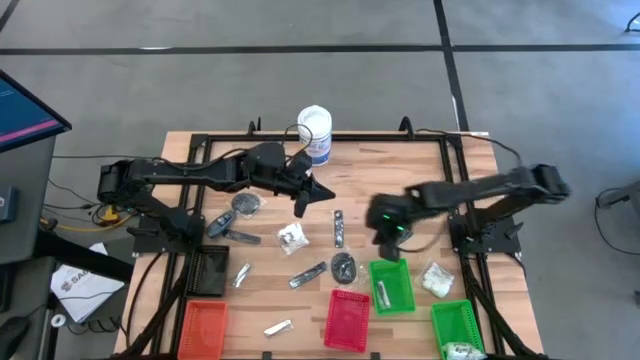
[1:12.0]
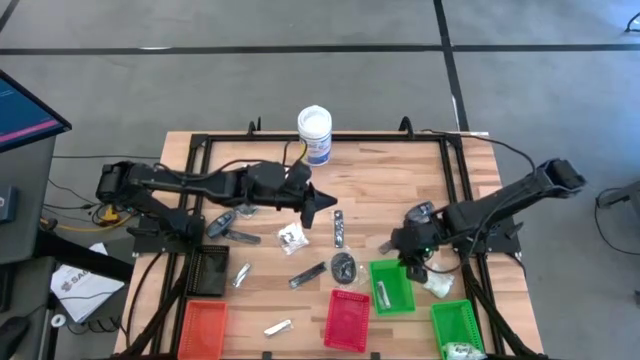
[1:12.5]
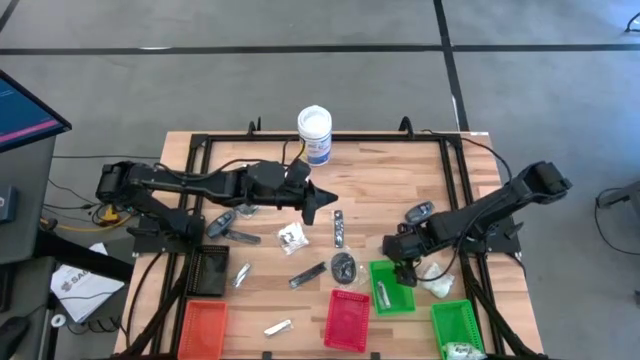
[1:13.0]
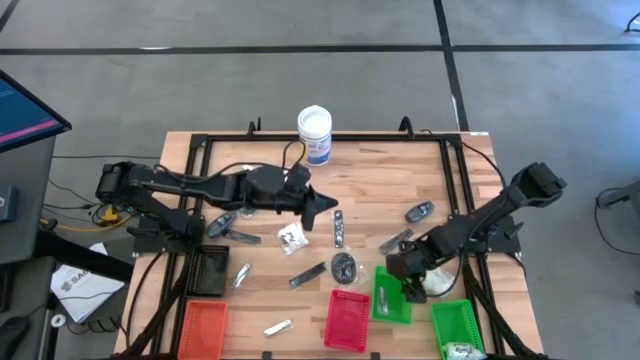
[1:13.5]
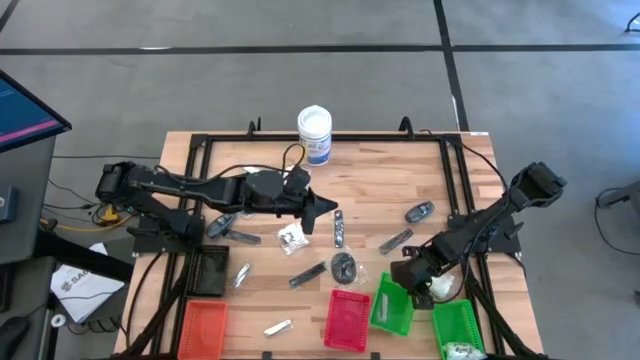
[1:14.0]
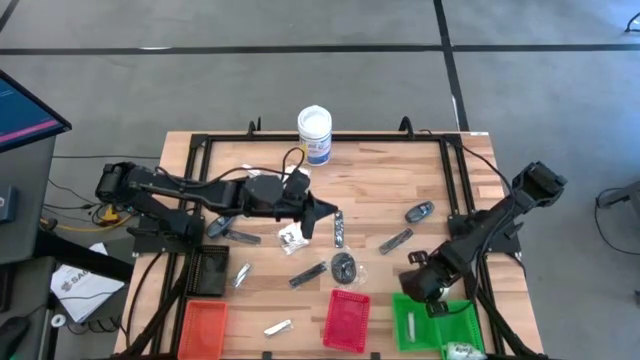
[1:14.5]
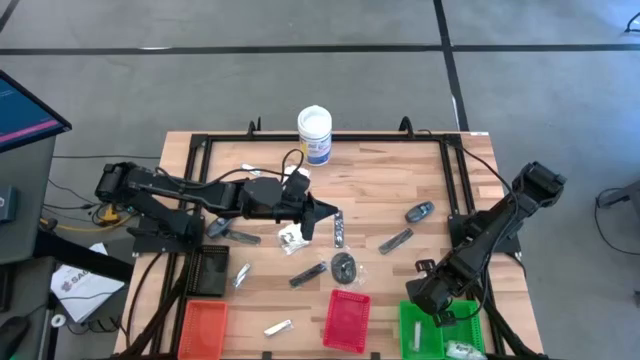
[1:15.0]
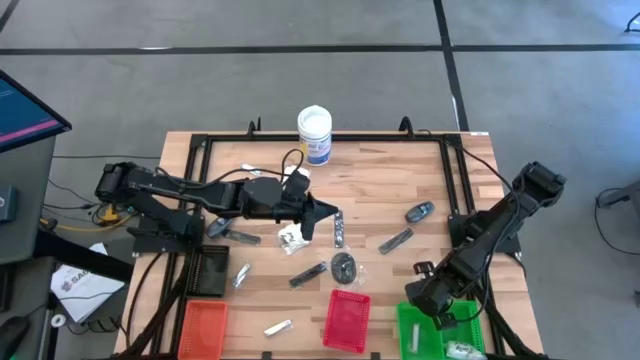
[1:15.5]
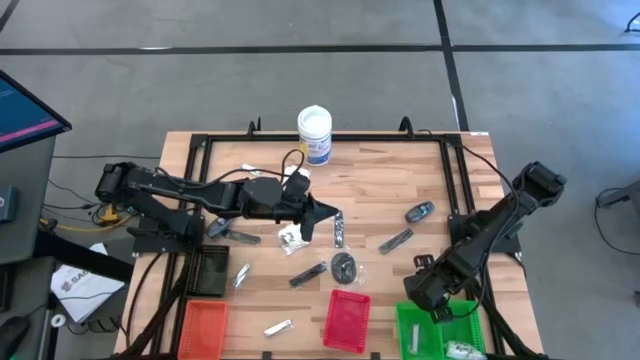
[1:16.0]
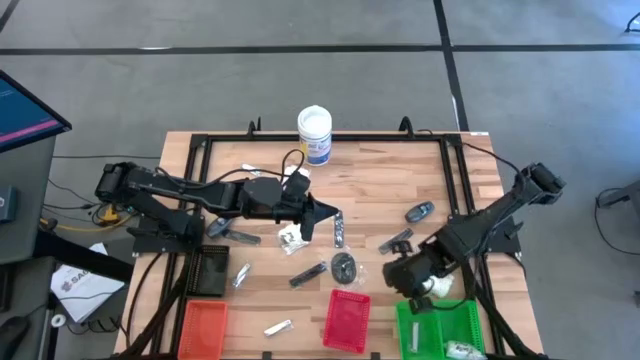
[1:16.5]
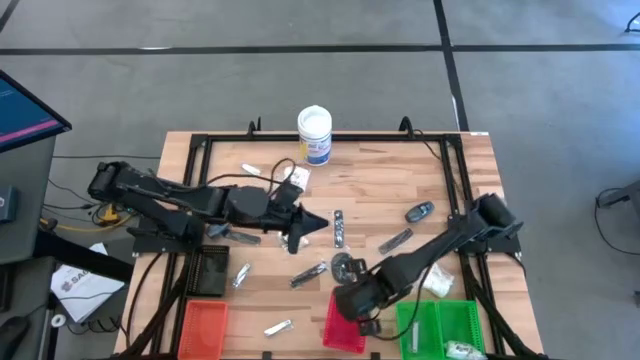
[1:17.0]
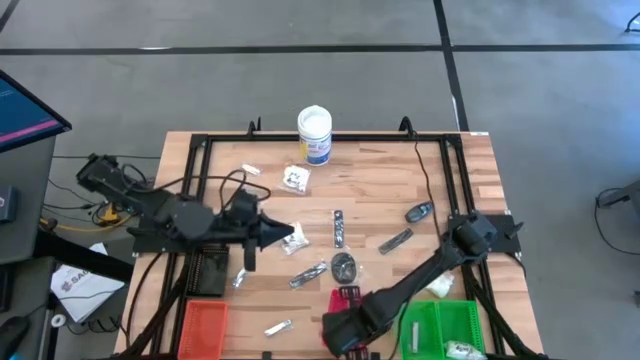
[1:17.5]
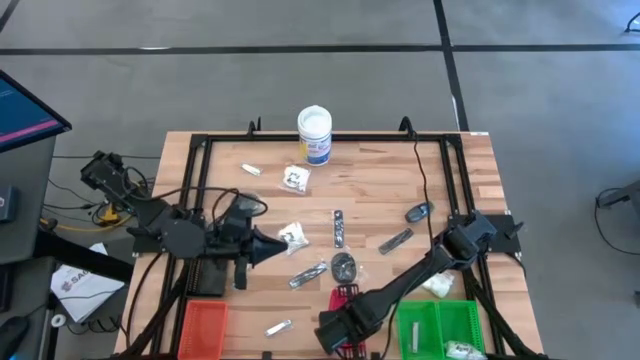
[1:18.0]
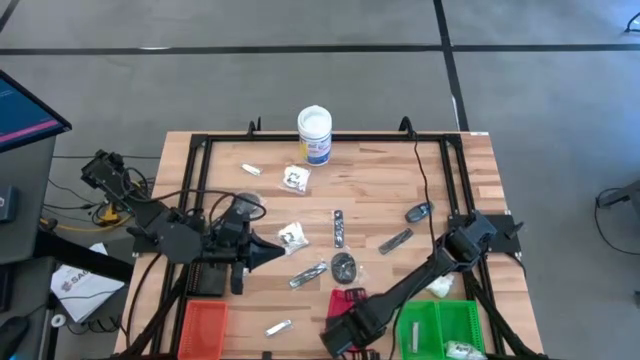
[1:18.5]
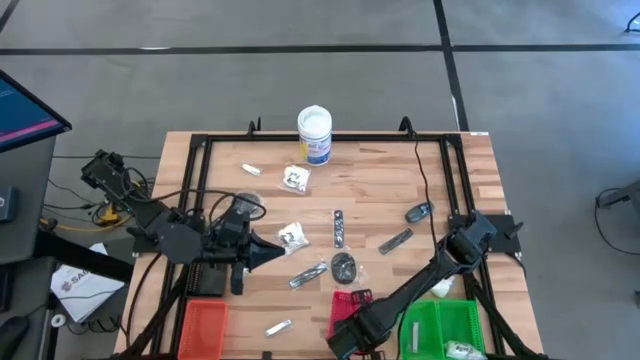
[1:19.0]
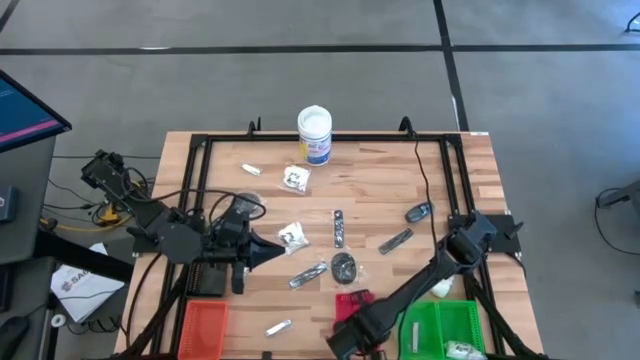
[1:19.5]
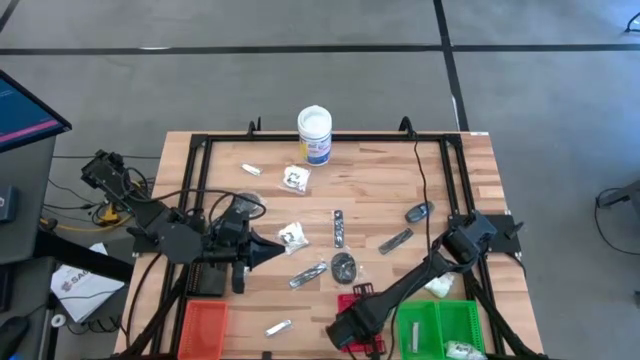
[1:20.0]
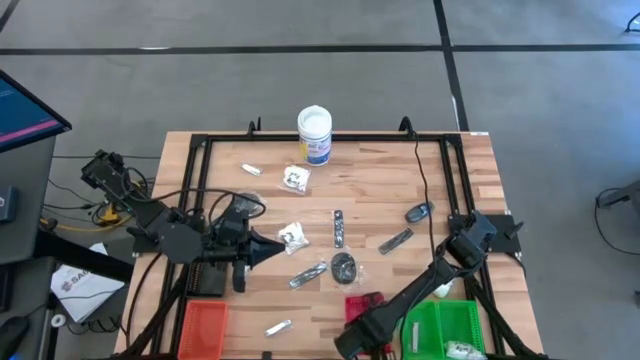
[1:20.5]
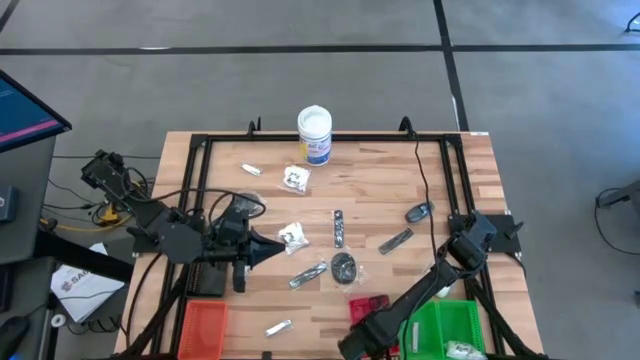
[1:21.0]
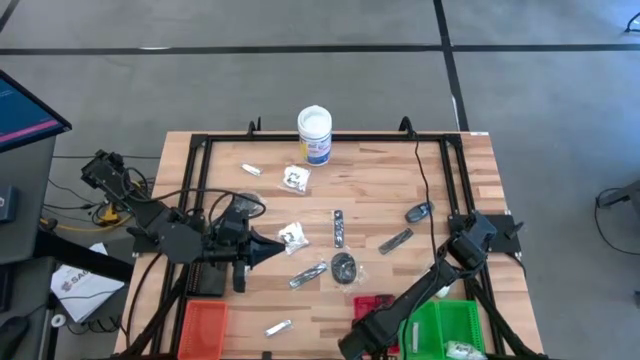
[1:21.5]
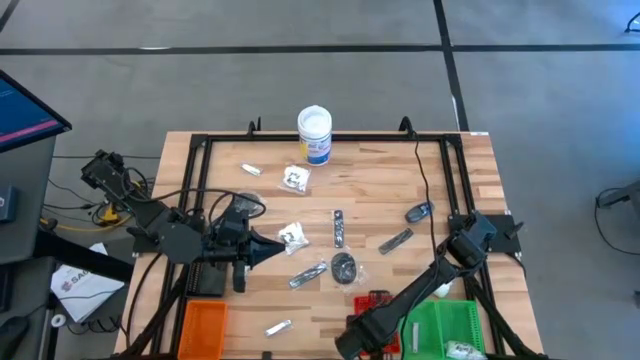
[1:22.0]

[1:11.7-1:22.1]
Task: Pick & Place Travel size toiletries
Adjust the bins

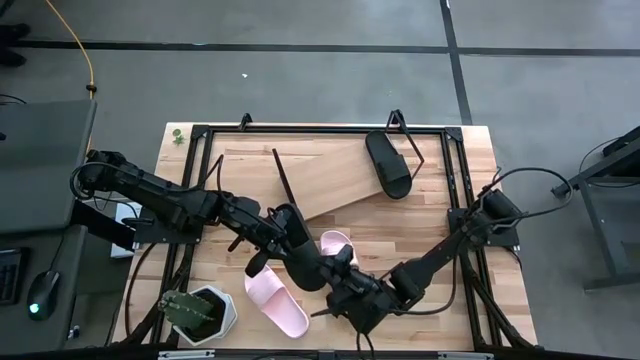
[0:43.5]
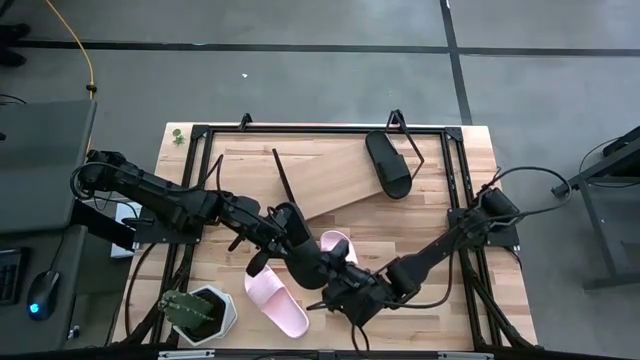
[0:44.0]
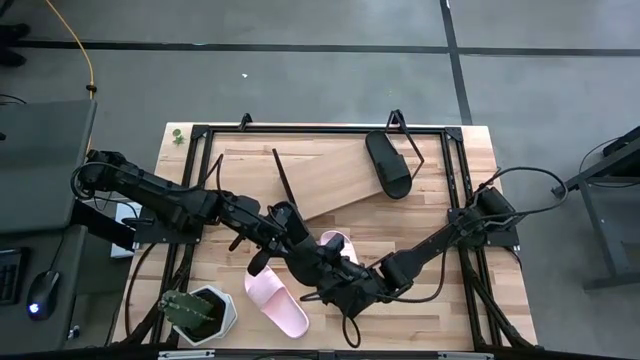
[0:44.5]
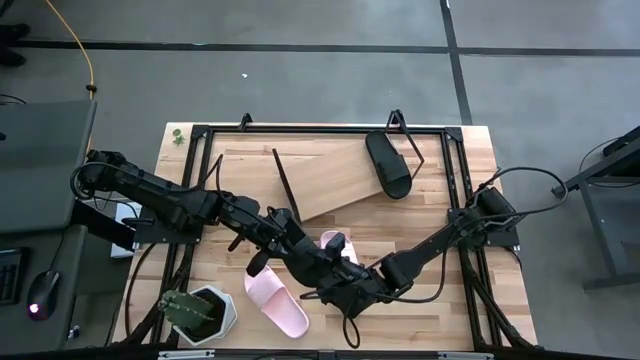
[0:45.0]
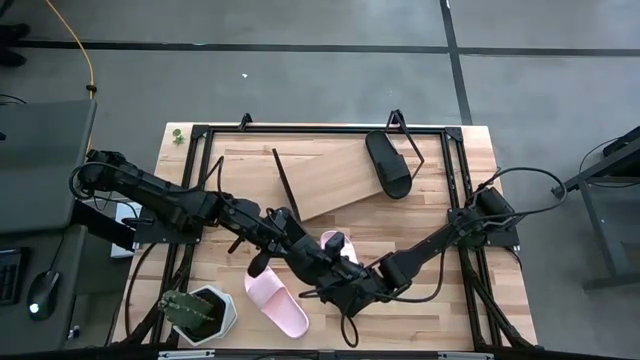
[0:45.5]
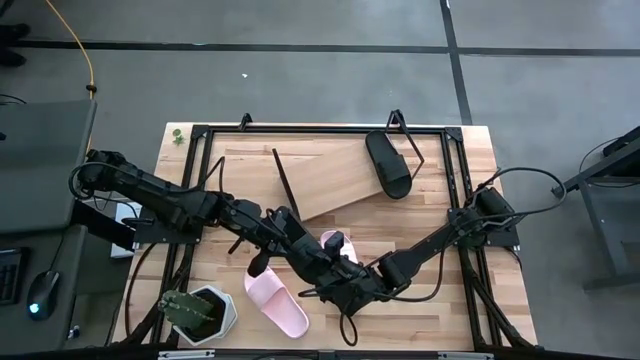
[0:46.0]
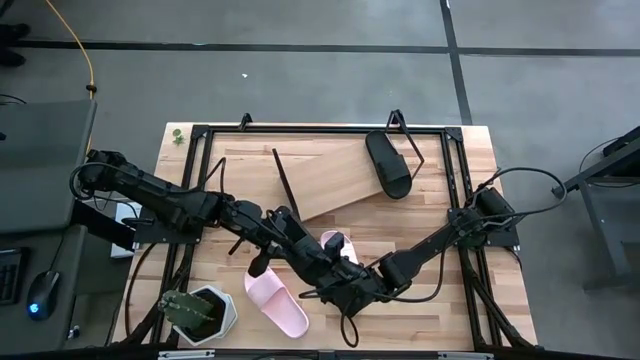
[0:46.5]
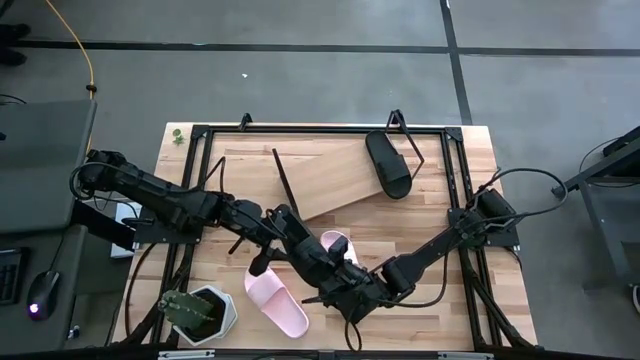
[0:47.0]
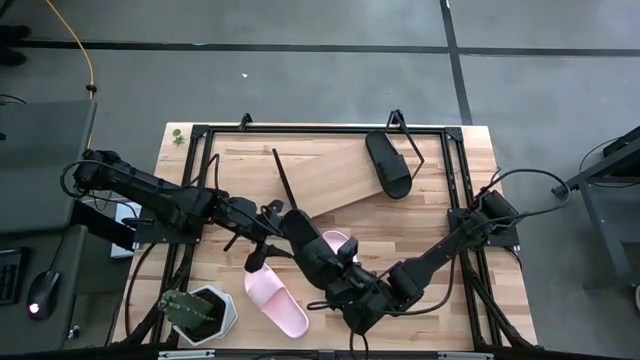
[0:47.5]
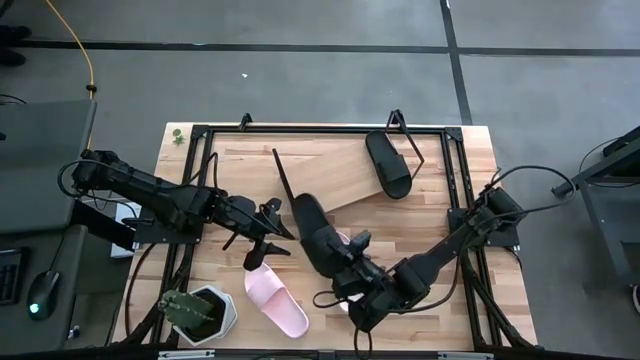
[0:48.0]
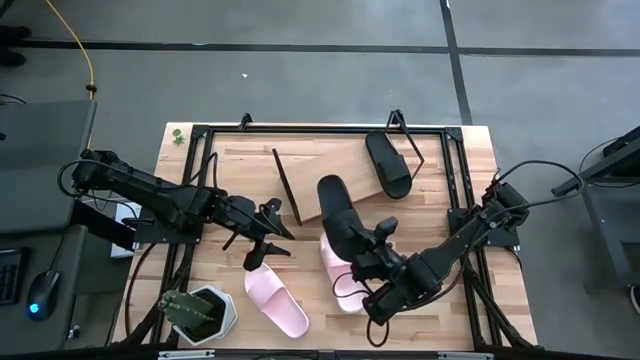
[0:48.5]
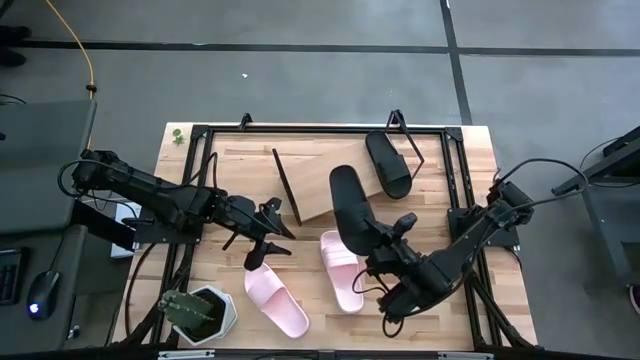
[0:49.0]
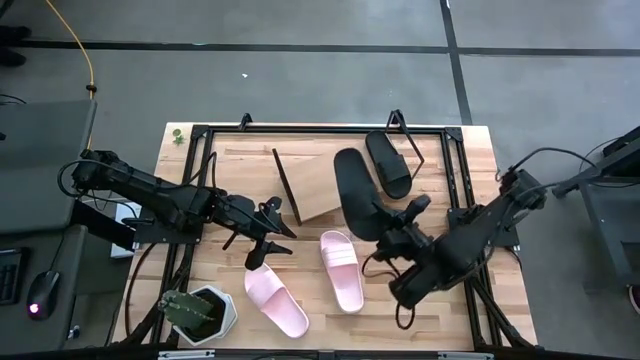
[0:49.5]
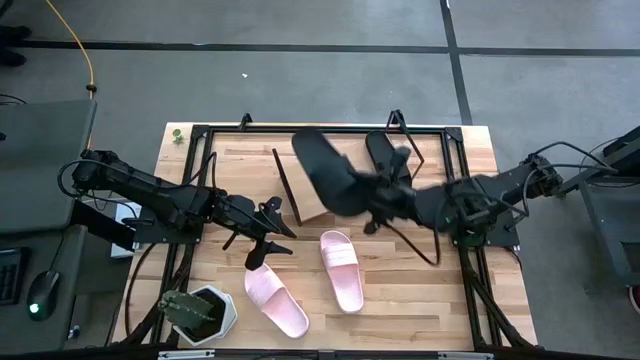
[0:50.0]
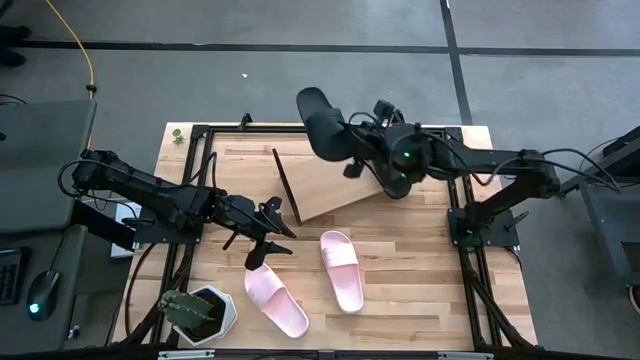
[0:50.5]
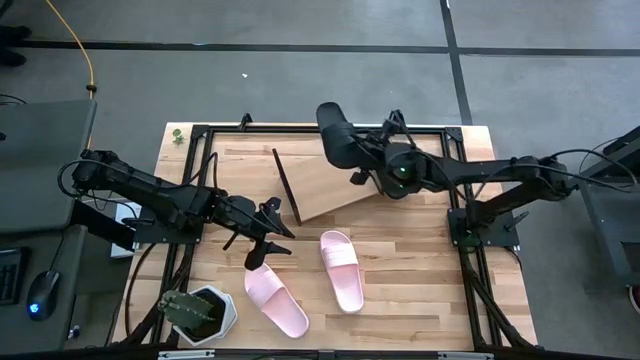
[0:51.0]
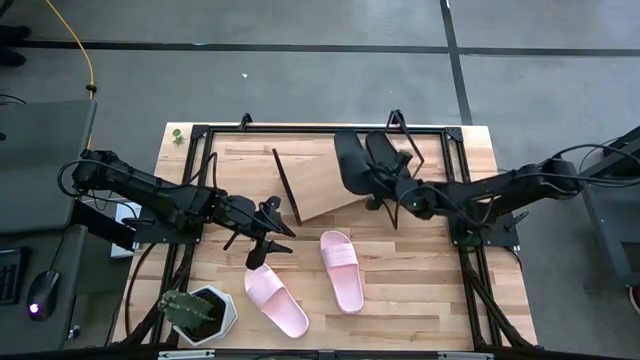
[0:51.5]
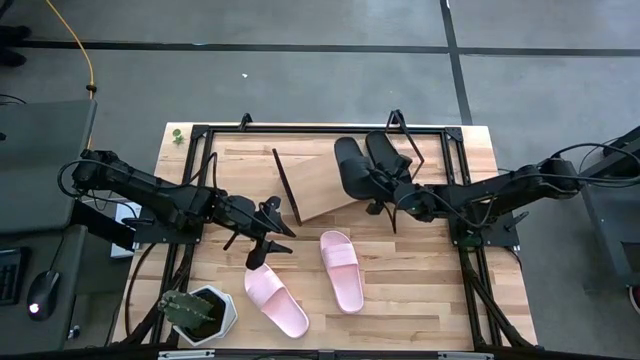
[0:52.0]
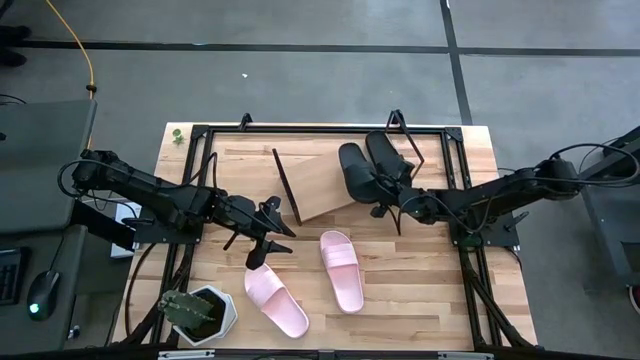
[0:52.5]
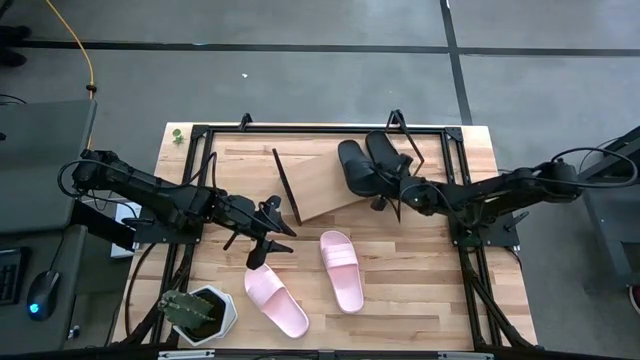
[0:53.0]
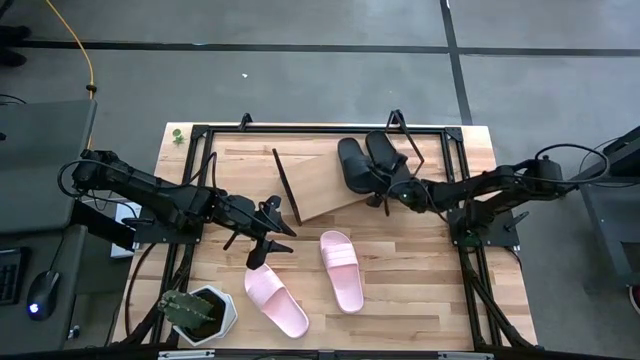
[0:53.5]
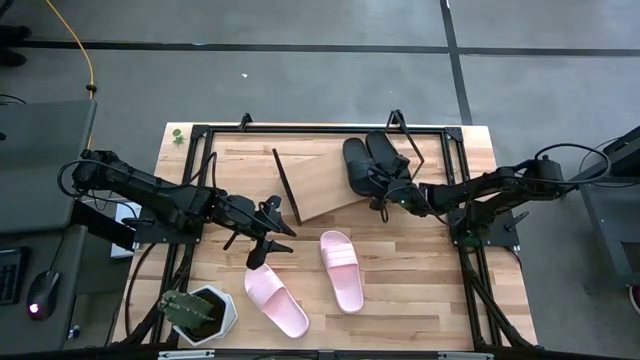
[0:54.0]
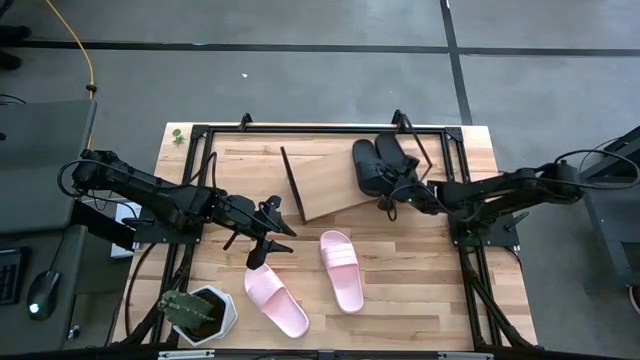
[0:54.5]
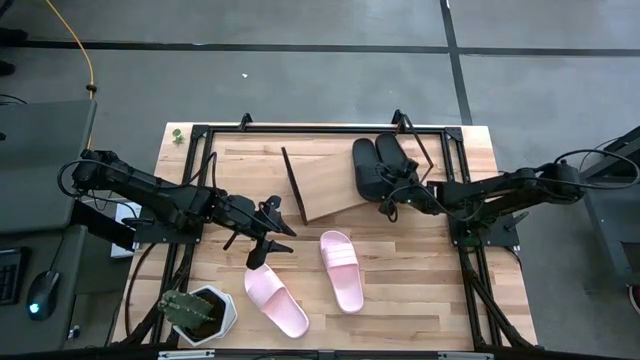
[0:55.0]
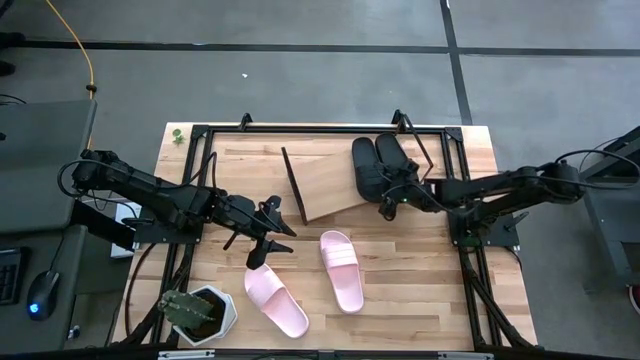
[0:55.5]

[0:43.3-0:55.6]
Task: Pick and place slides into the shelf
Put the black slipper on the shelf
